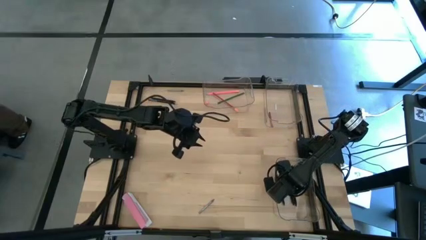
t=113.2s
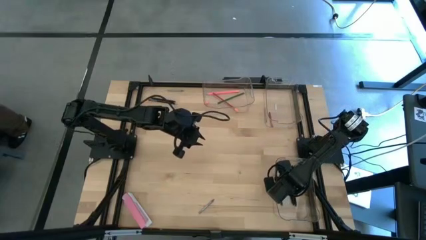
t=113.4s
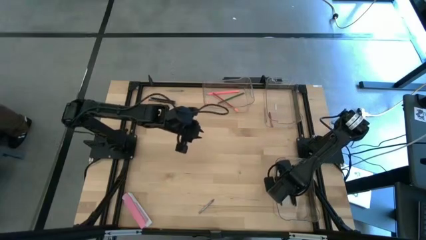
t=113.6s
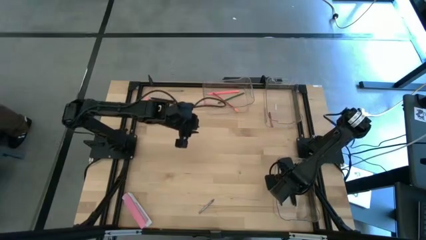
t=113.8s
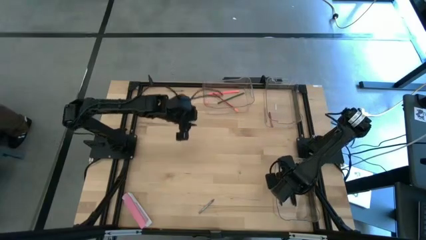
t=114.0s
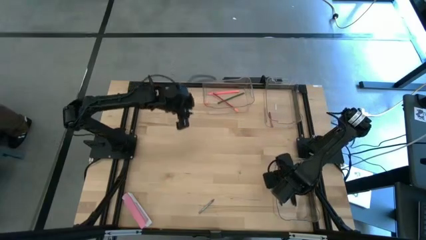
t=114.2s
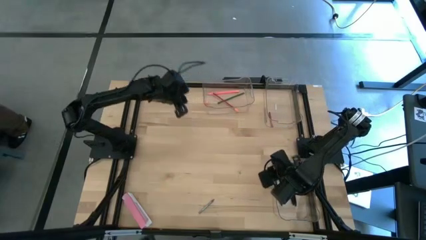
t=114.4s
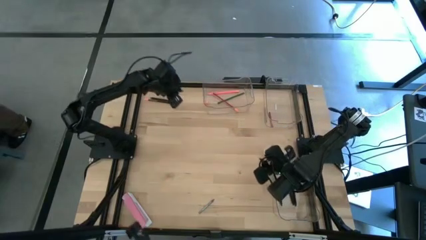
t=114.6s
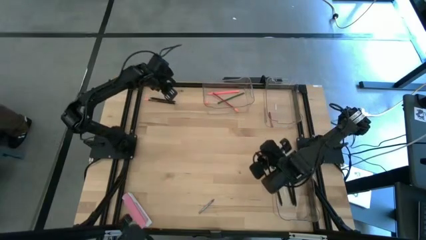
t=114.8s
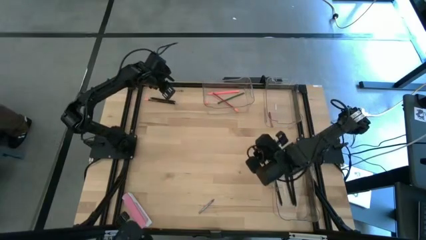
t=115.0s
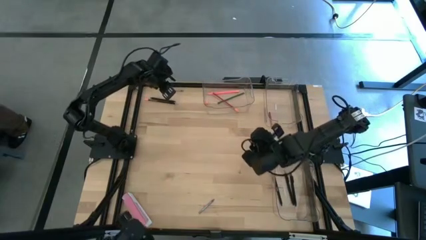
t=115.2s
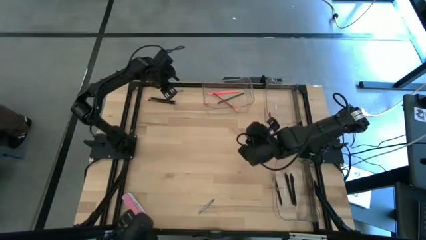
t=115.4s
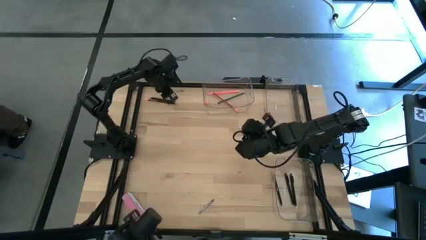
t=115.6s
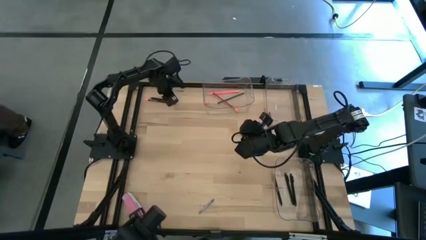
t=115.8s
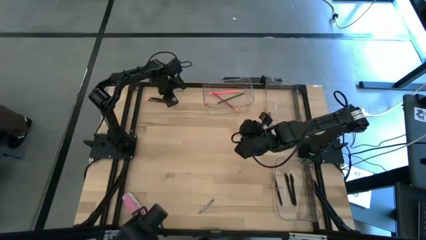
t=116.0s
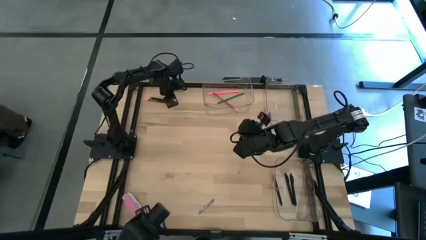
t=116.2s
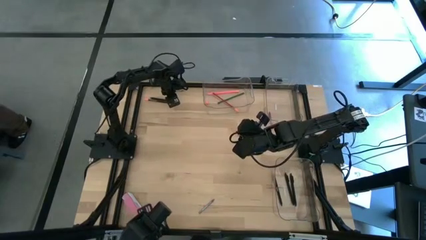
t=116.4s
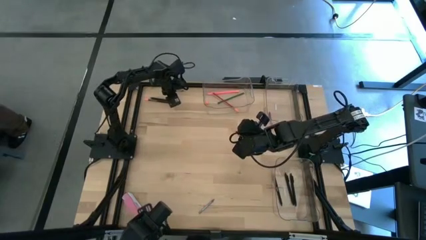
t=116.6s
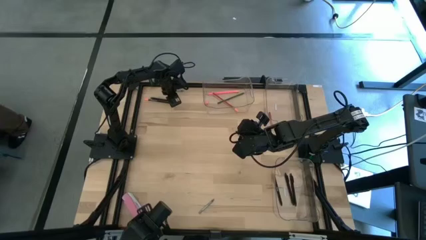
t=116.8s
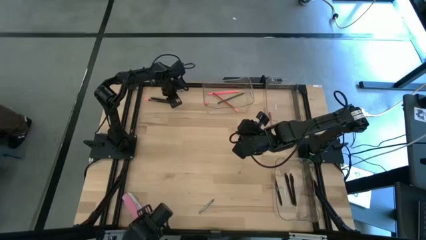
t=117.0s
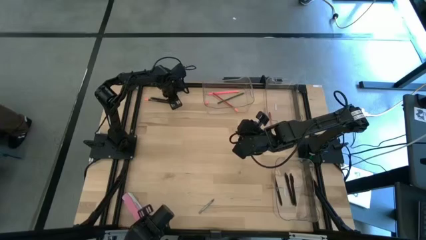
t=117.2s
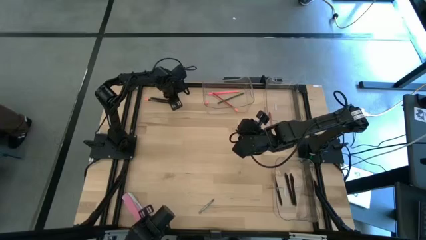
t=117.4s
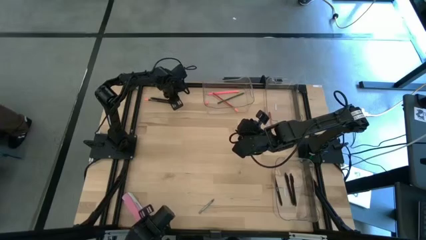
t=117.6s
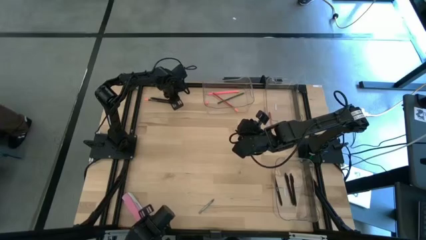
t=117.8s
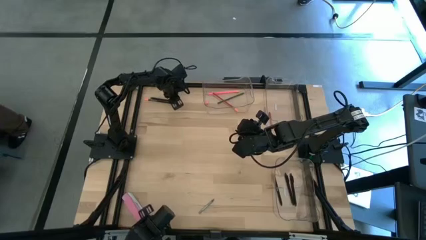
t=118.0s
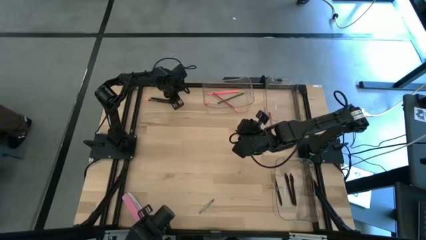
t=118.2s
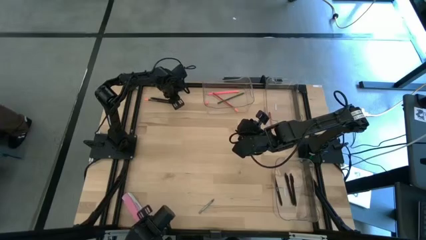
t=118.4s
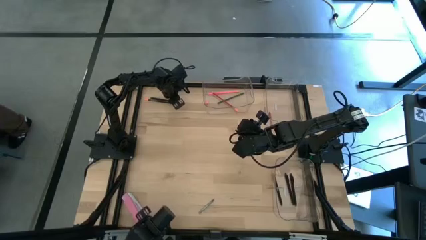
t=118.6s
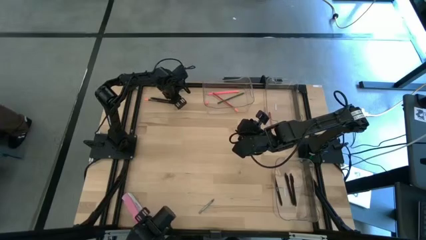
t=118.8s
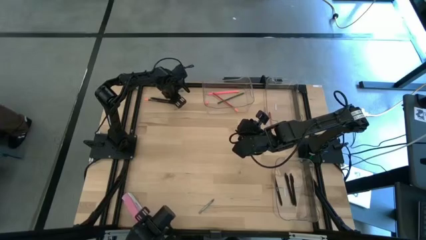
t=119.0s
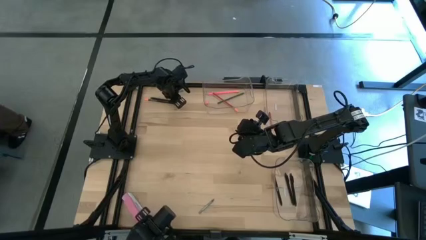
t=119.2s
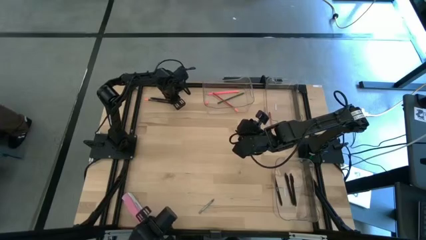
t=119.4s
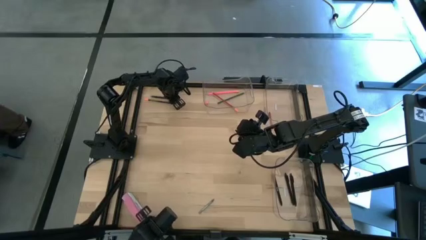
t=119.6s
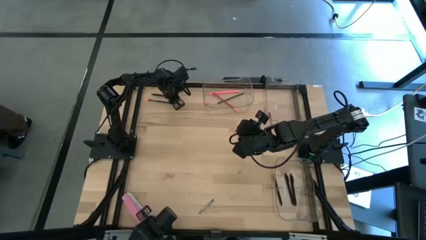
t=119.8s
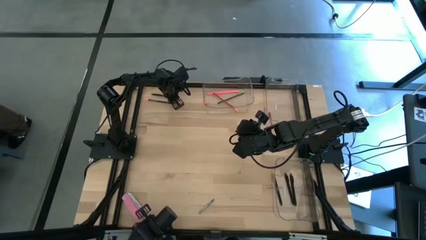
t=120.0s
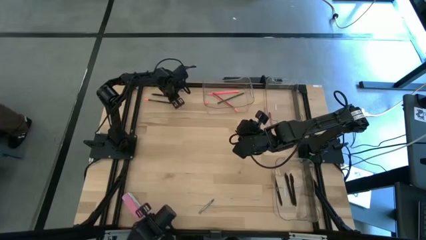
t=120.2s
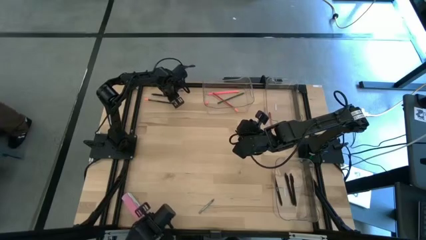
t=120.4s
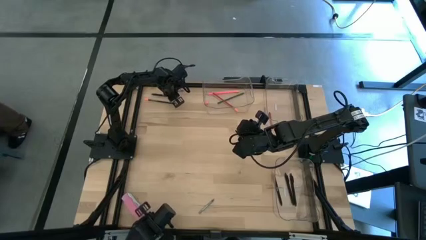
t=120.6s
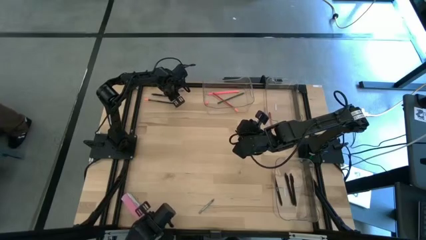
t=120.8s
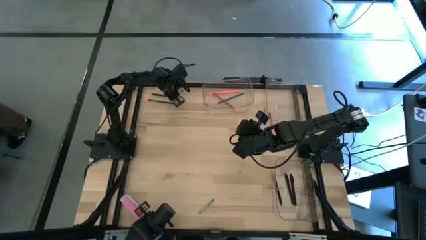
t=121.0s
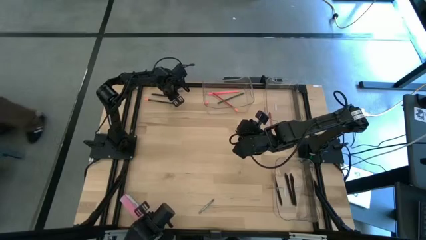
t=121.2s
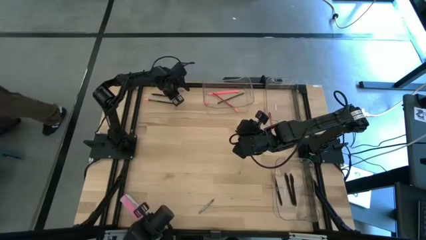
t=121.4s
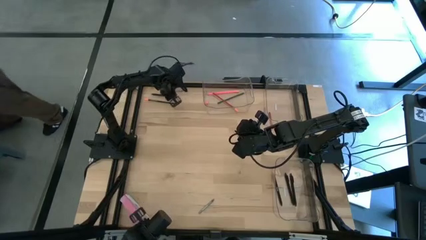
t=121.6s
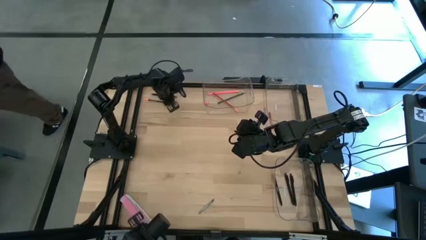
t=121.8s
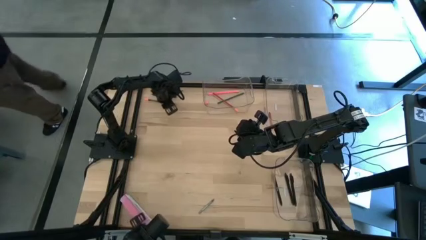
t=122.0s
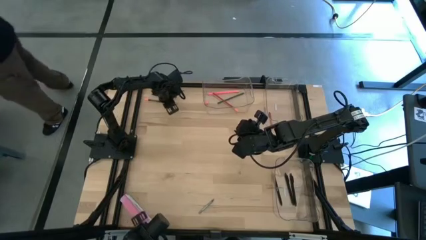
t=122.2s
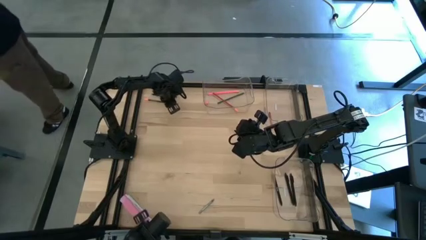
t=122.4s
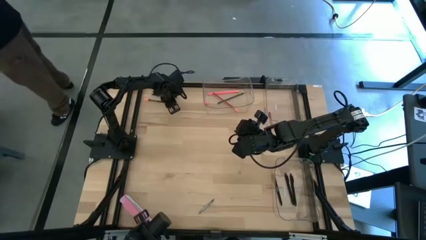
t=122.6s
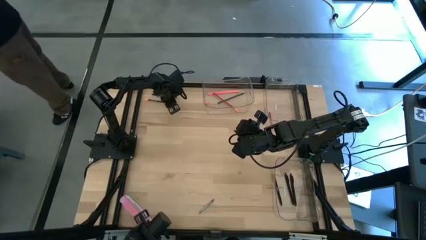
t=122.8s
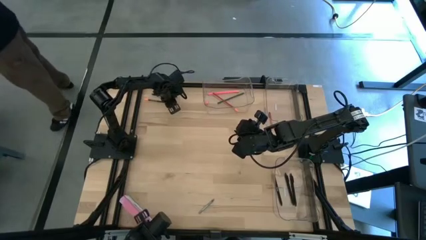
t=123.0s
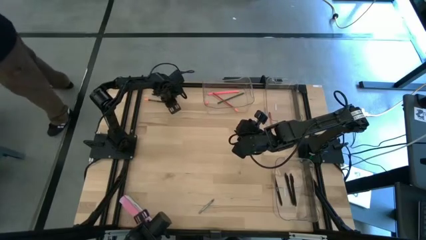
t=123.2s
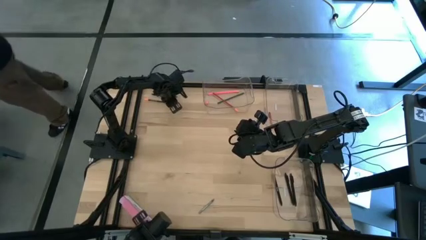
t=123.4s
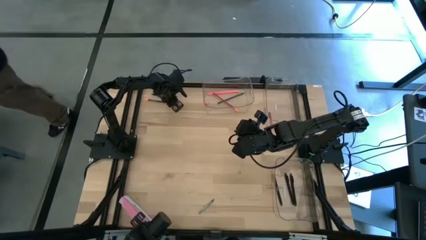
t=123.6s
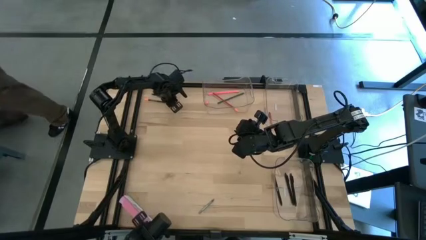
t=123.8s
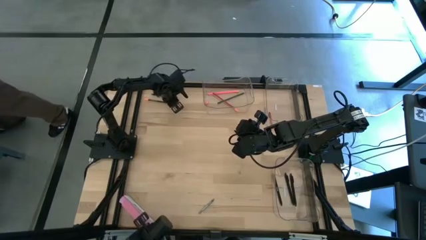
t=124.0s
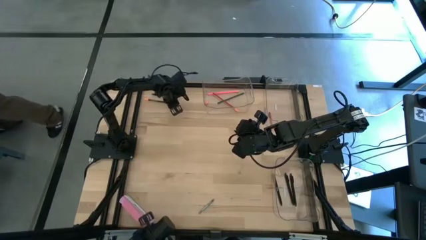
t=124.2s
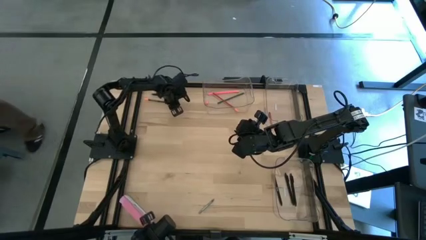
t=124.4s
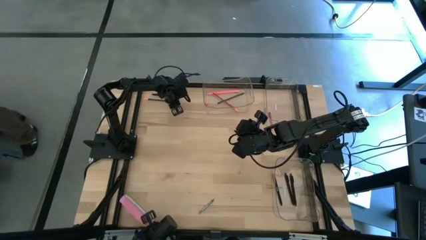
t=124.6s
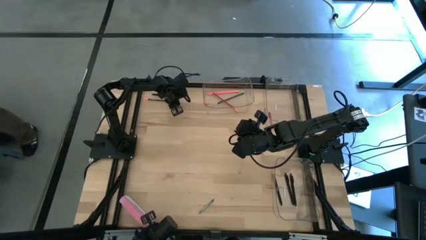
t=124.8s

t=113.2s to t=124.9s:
Task: Sort crayons/erasers/pens/pencils in bins
Put the dark blue pencil into the top left transparent bin
